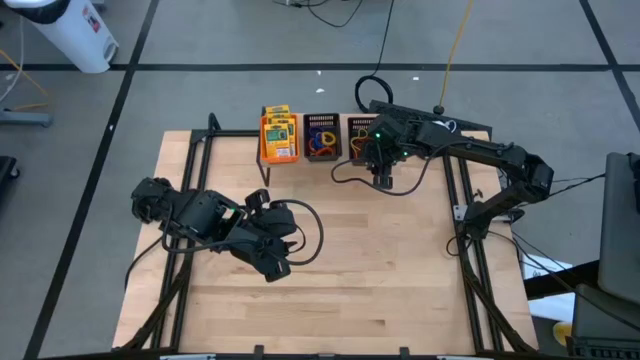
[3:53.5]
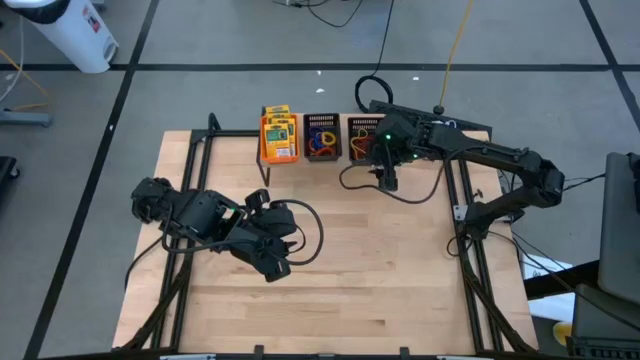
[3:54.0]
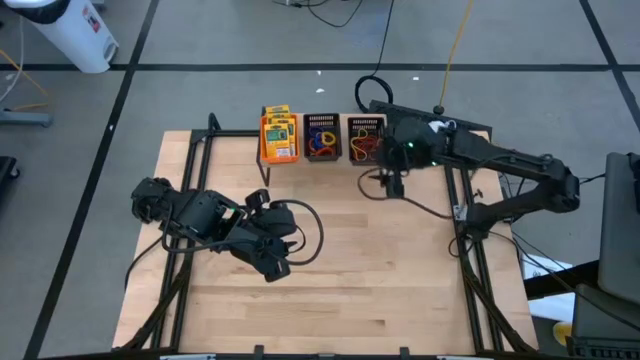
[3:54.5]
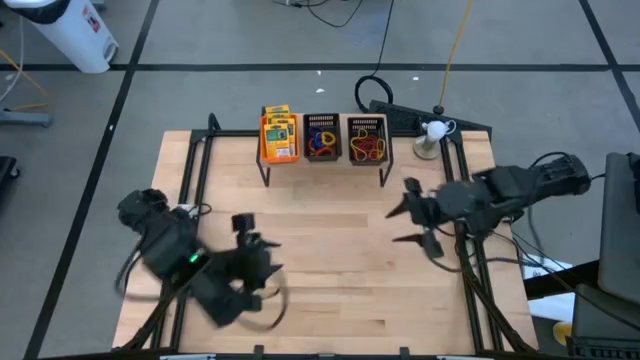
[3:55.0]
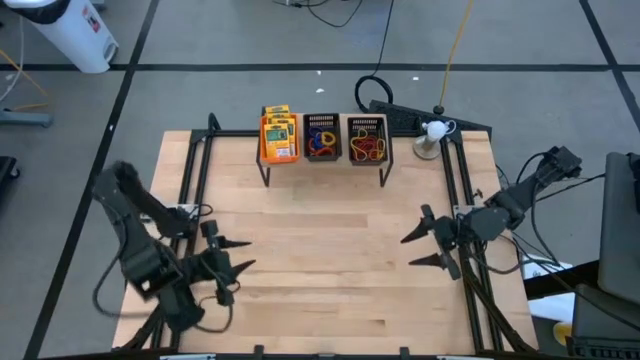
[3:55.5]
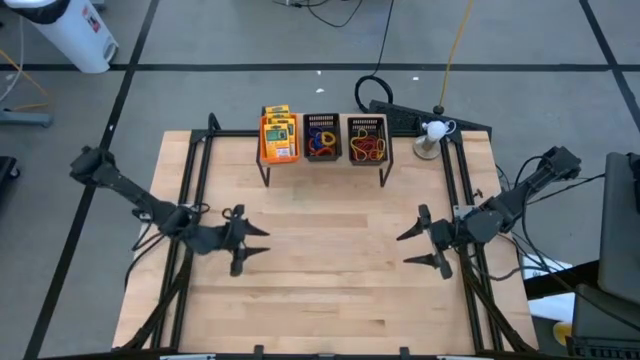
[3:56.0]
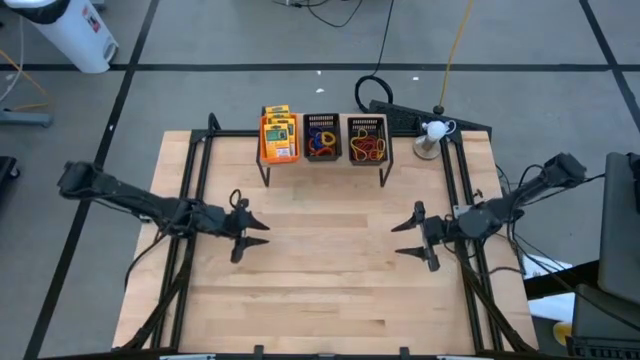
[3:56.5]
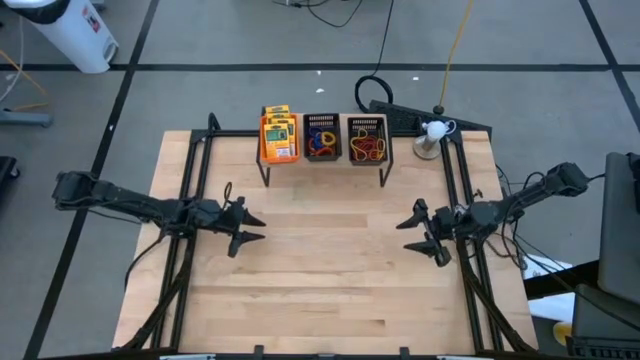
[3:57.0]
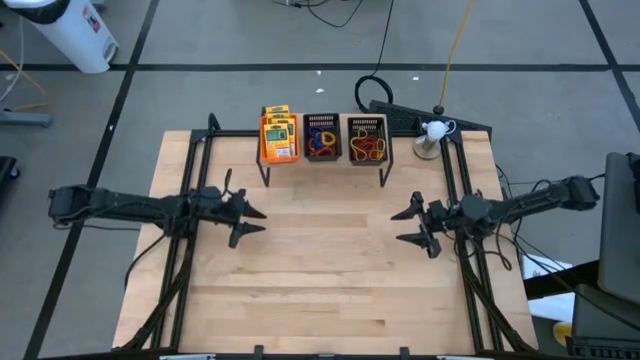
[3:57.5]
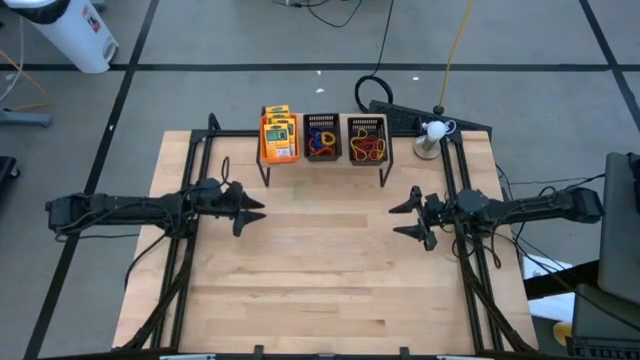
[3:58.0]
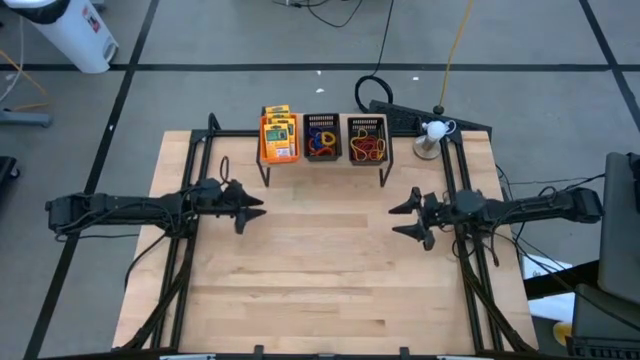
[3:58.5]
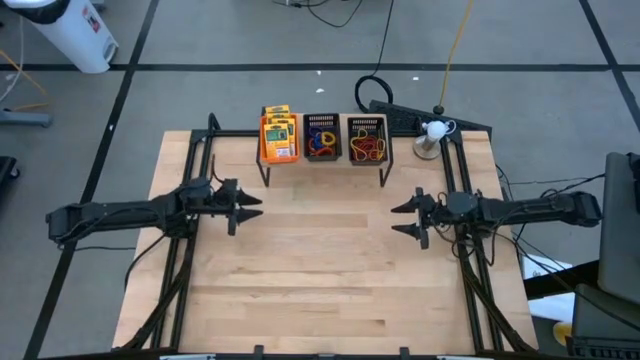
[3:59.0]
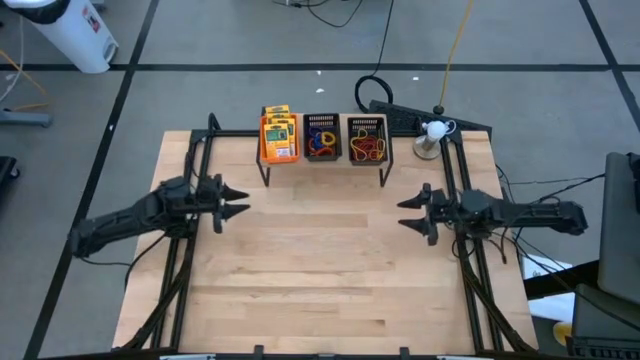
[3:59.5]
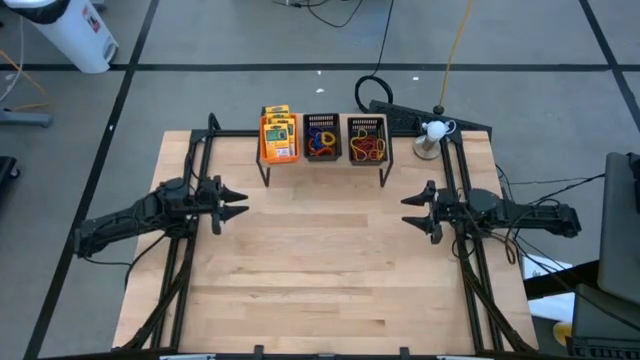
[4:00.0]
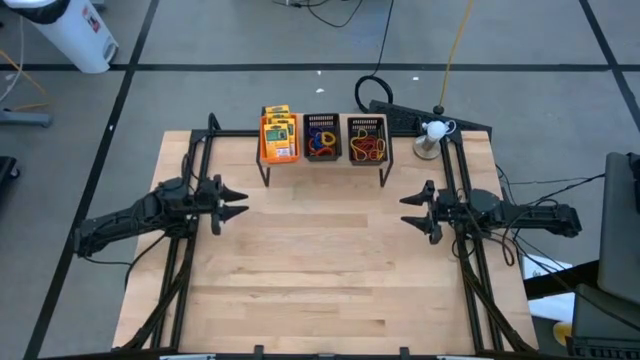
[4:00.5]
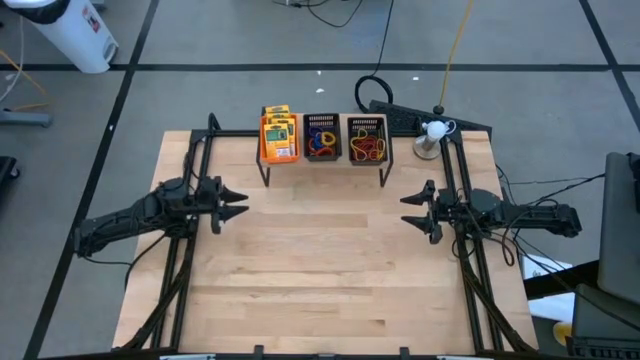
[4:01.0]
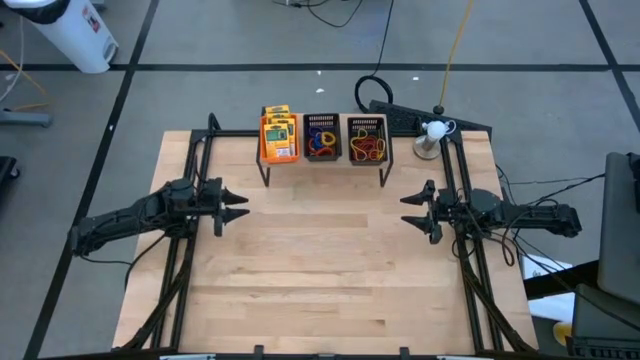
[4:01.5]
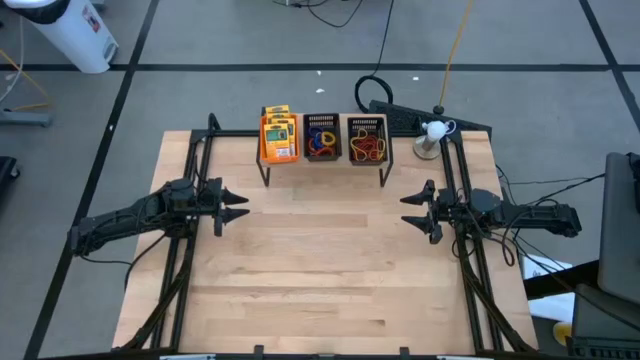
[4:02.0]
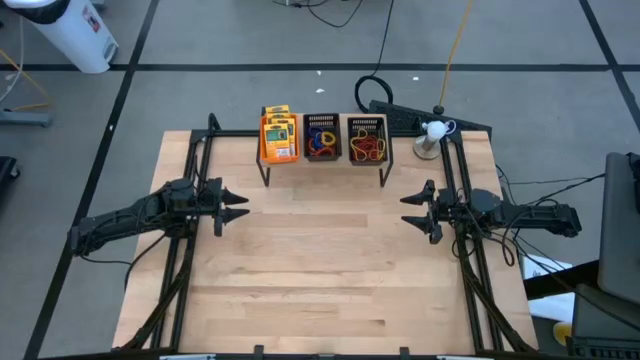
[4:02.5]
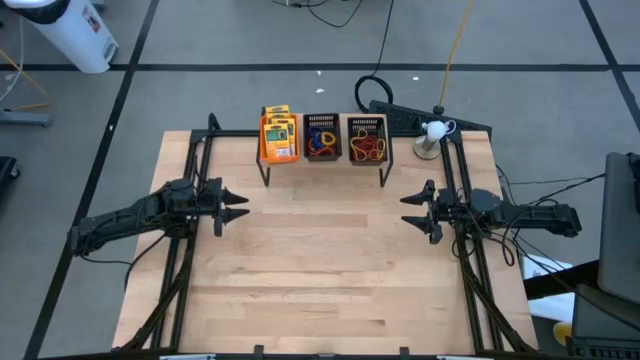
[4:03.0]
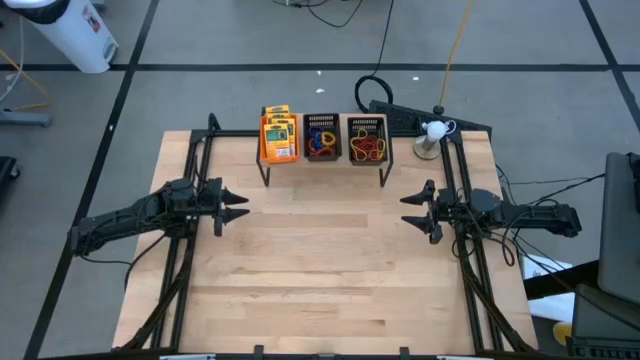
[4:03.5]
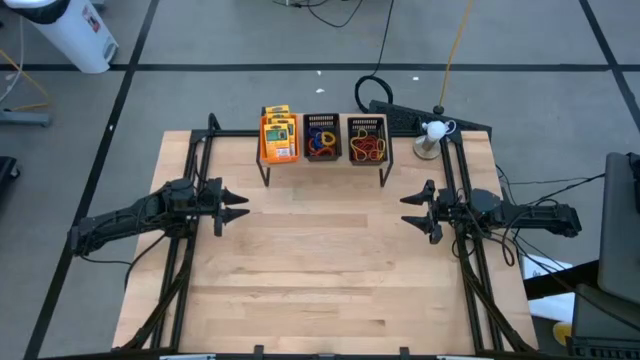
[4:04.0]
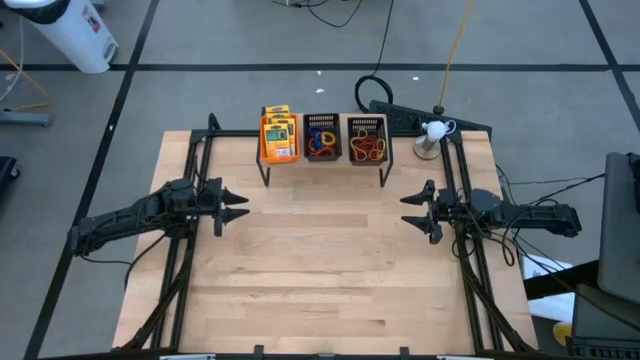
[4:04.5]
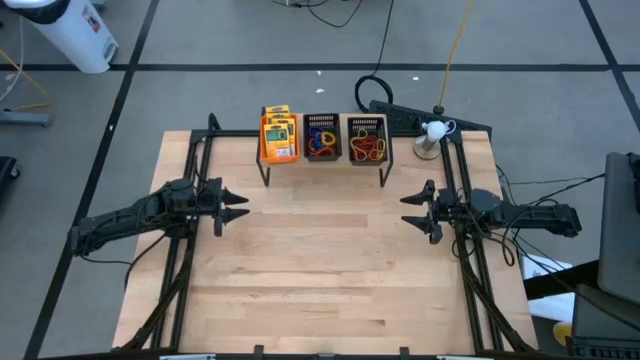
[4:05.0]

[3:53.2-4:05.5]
Task: Pick & Place Office Desk Supplies
Return to Home Position

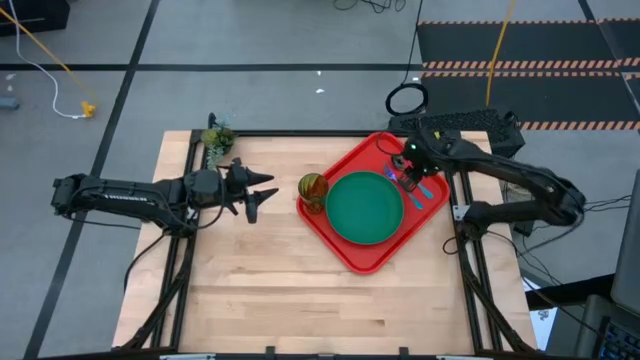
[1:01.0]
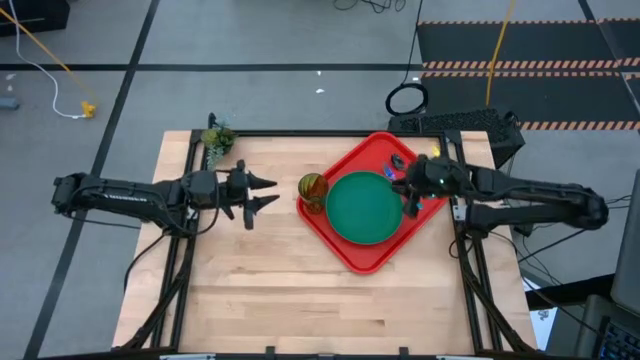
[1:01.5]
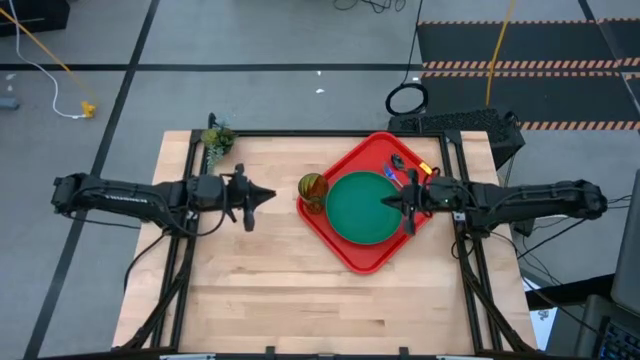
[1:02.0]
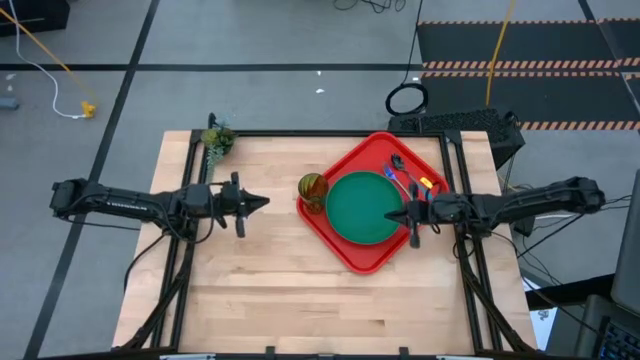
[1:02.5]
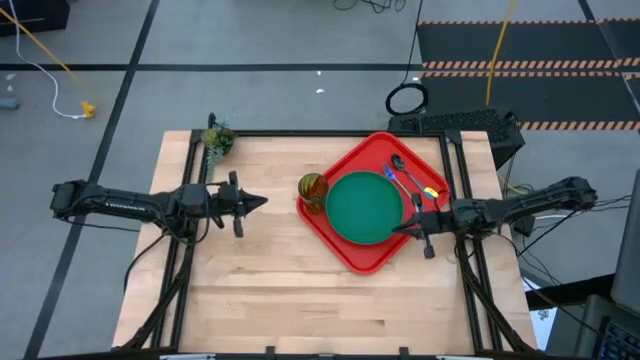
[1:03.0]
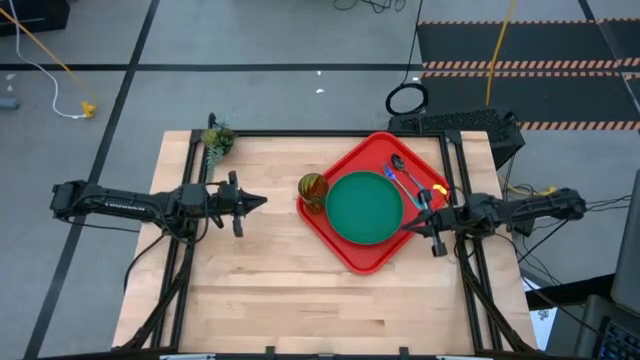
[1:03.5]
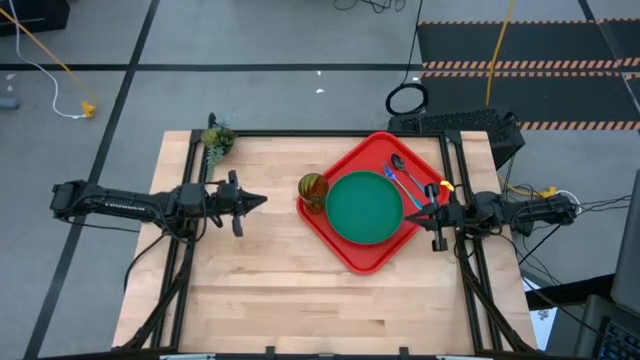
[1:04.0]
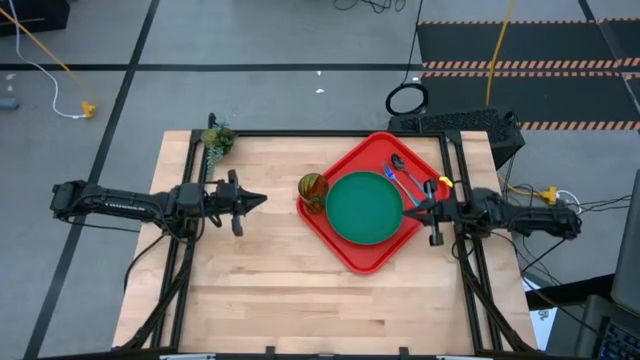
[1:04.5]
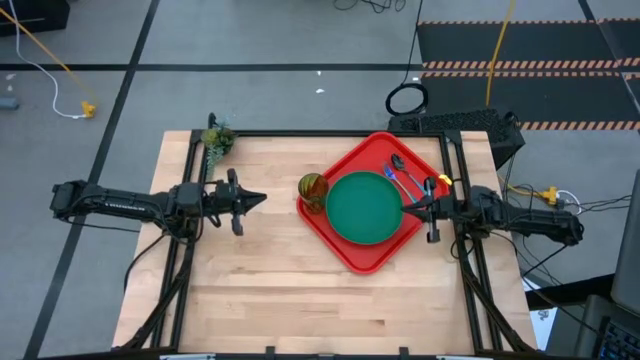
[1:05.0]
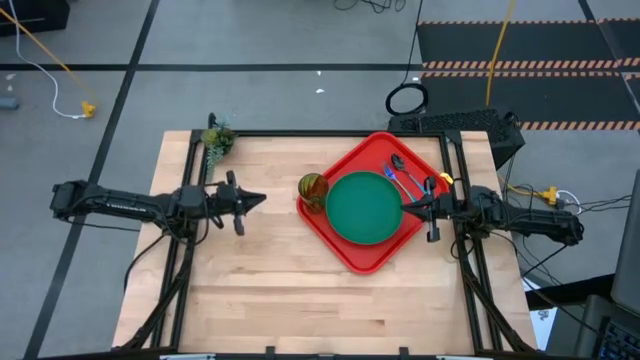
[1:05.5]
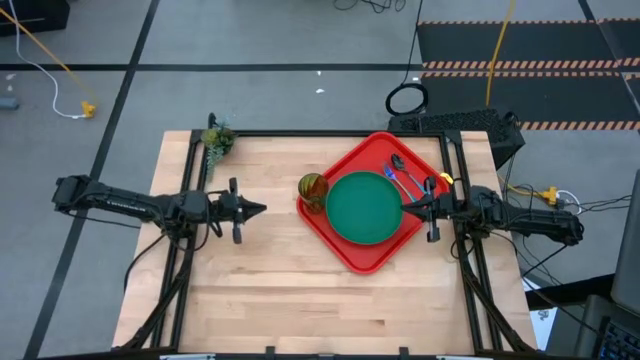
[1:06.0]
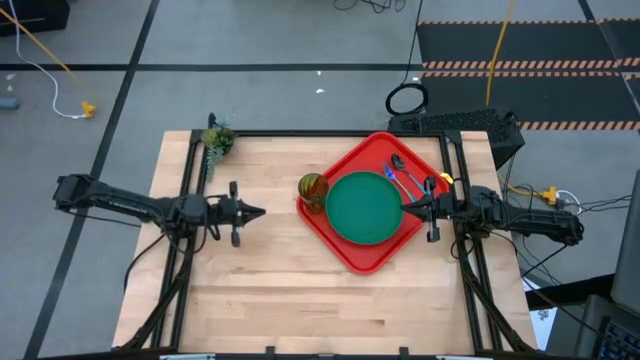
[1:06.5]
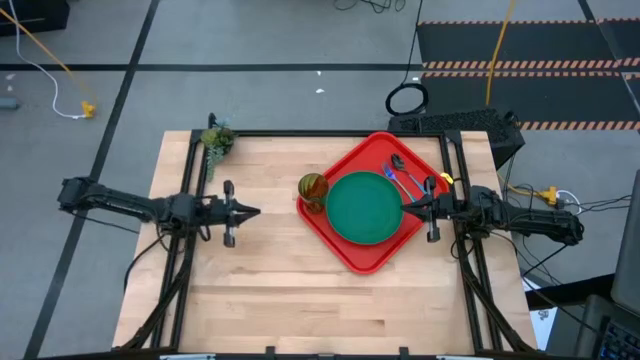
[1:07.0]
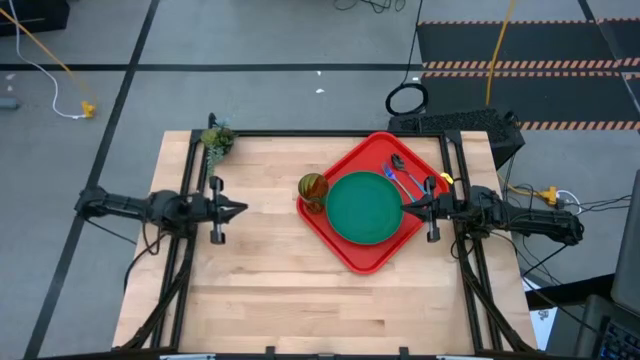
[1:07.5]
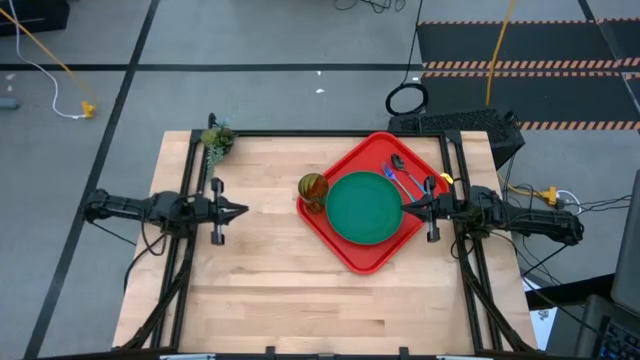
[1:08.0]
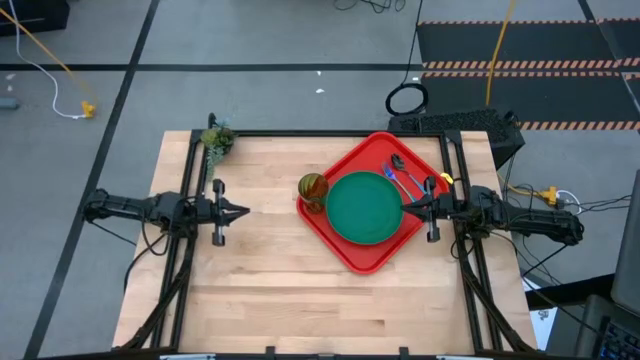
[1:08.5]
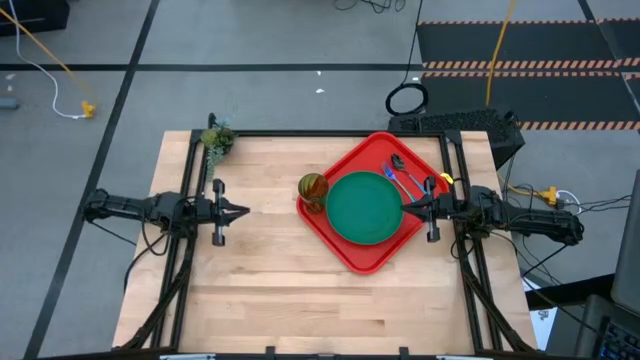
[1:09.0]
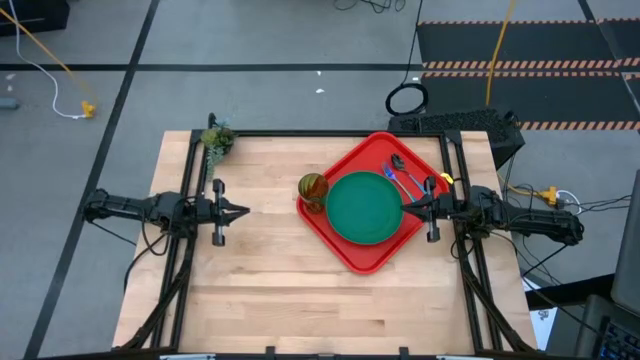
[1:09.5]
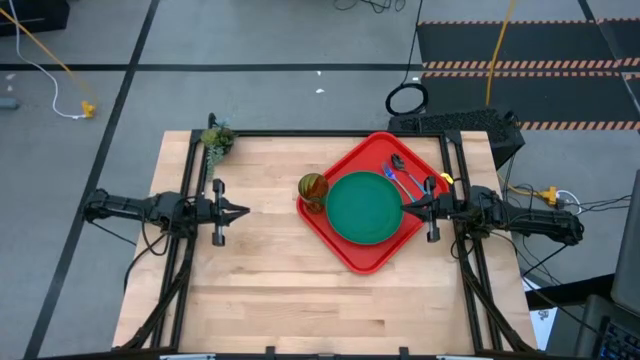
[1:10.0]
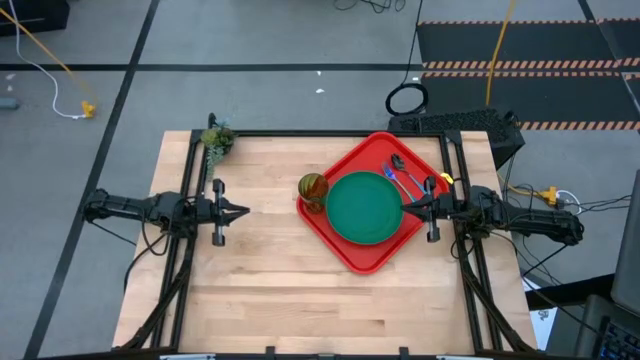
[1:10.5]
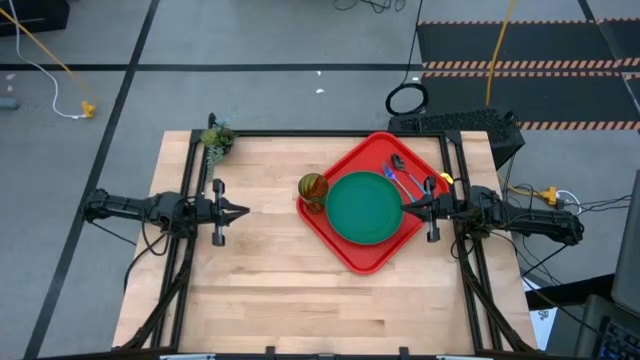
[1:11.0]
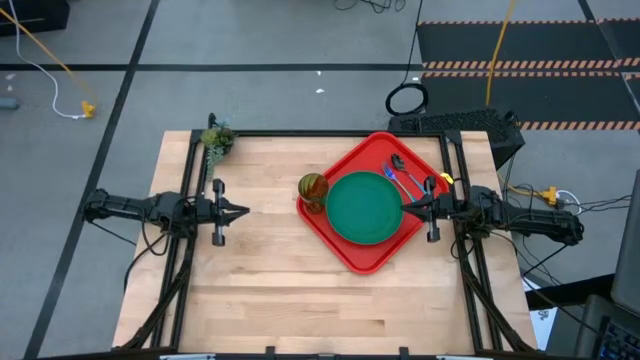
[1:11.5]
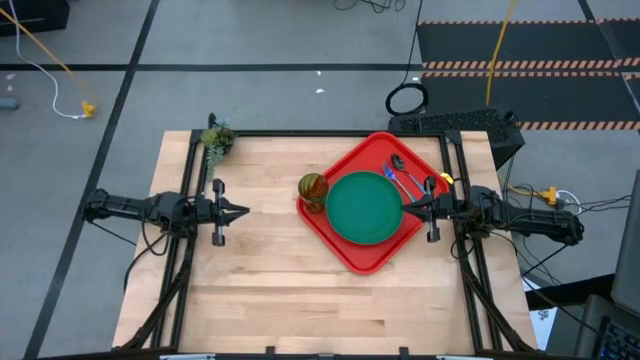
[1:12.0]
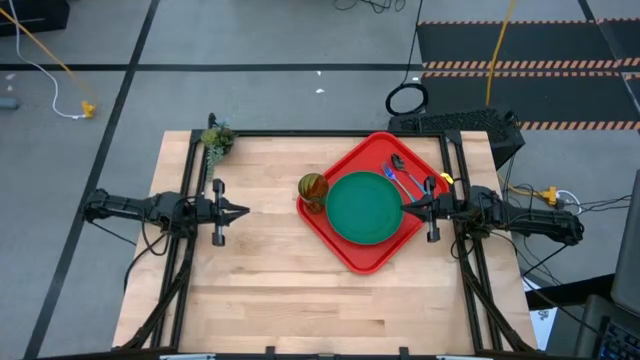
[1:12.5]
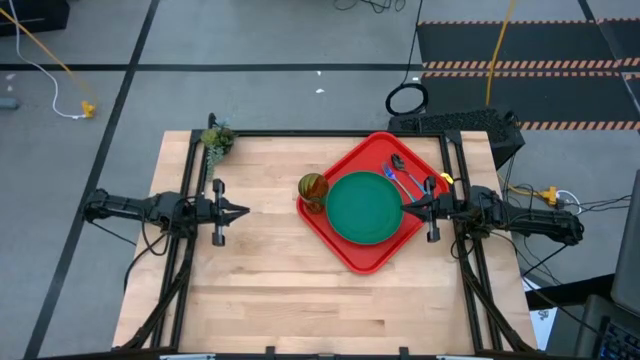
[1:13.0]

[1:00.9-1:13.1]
Task: Pick and place plate/cup/fork/spoon on tray
Return to Home Position
